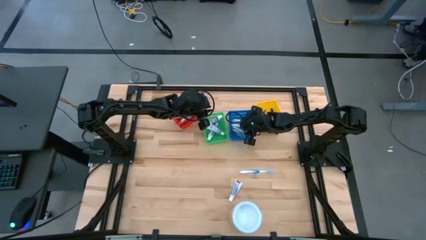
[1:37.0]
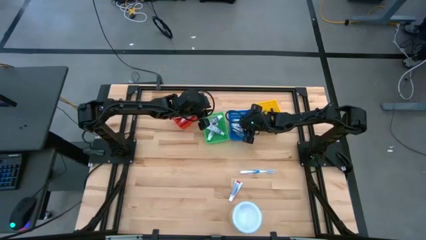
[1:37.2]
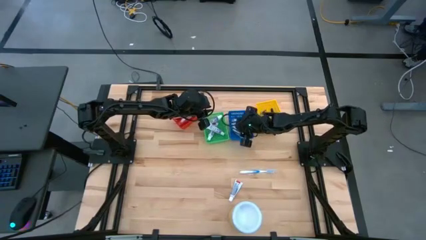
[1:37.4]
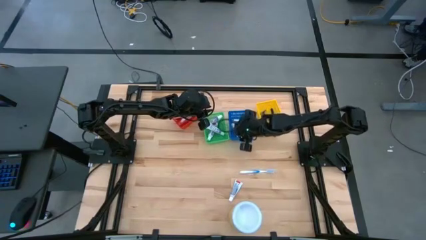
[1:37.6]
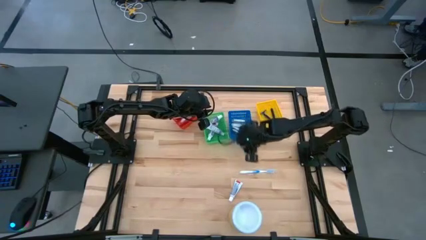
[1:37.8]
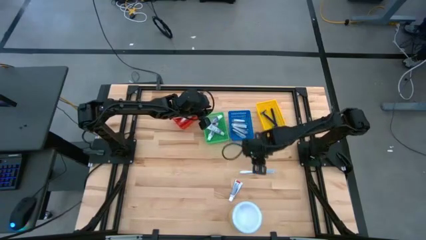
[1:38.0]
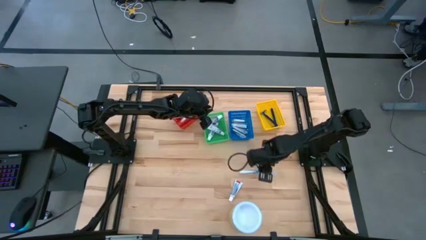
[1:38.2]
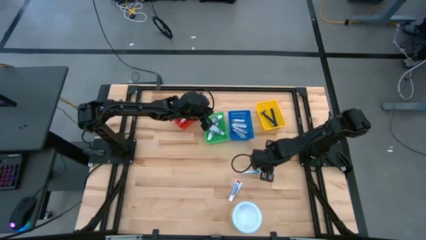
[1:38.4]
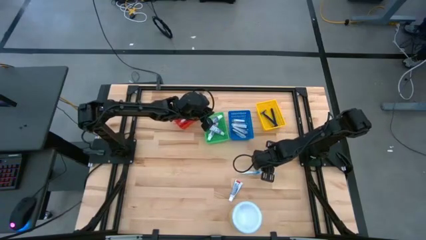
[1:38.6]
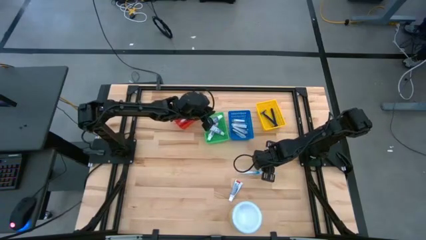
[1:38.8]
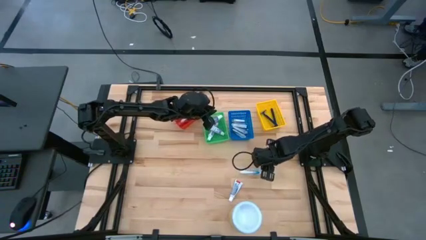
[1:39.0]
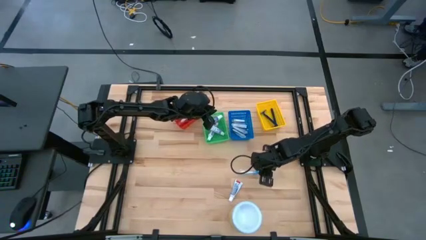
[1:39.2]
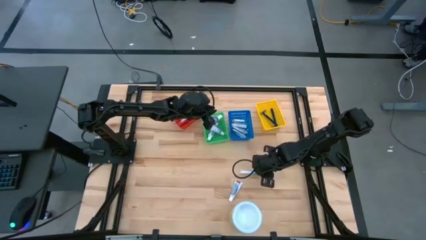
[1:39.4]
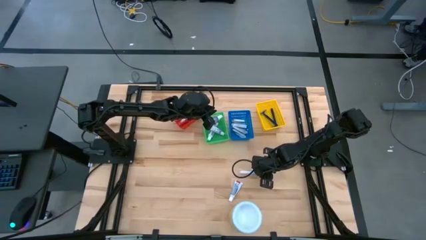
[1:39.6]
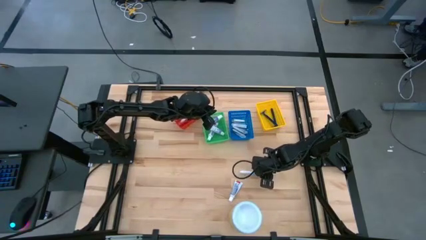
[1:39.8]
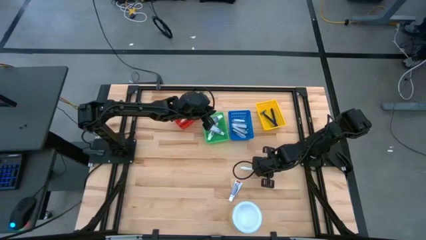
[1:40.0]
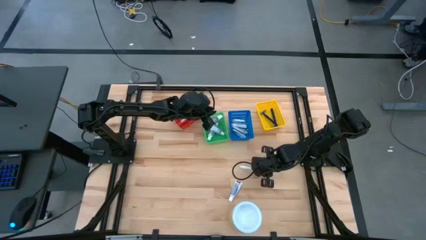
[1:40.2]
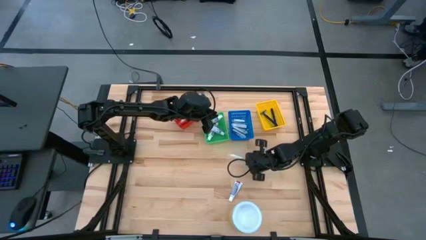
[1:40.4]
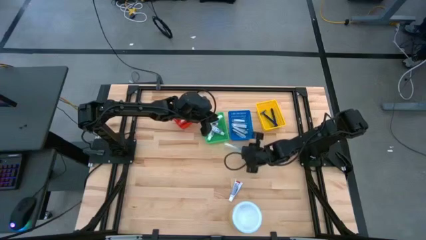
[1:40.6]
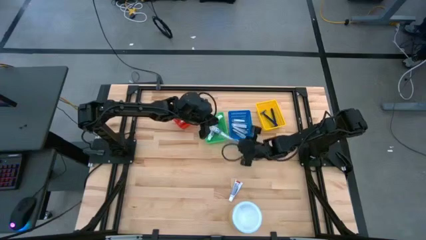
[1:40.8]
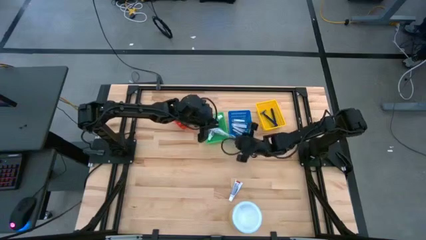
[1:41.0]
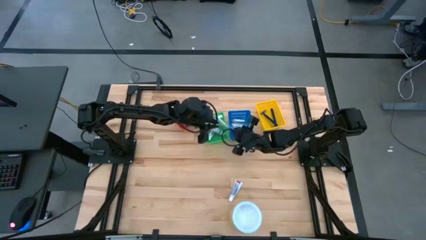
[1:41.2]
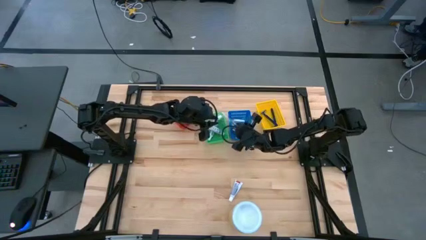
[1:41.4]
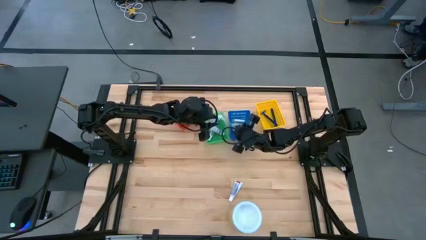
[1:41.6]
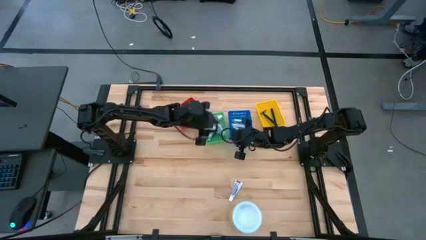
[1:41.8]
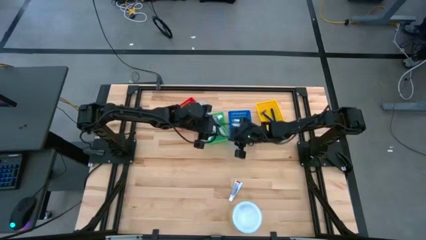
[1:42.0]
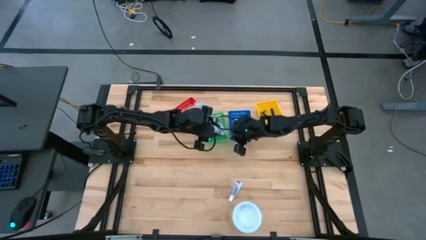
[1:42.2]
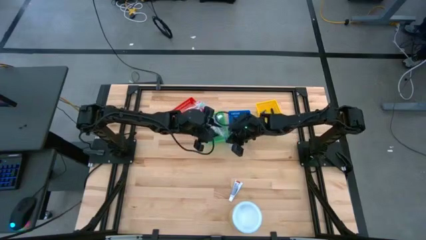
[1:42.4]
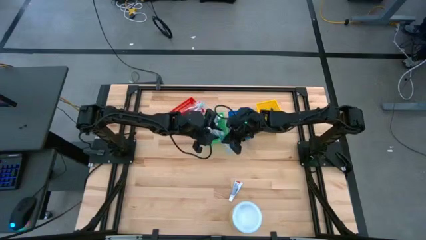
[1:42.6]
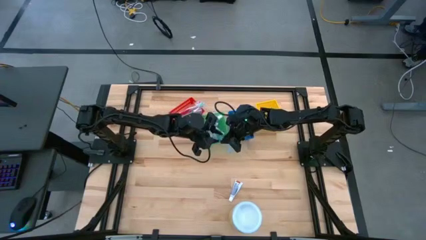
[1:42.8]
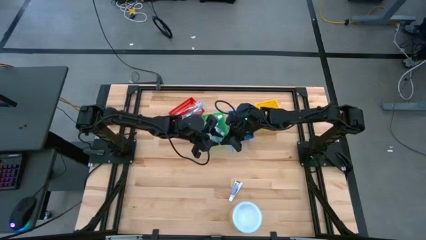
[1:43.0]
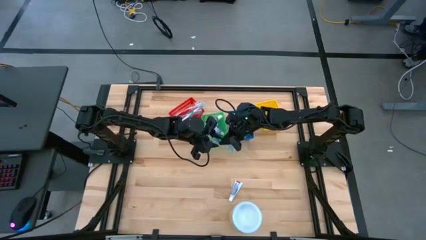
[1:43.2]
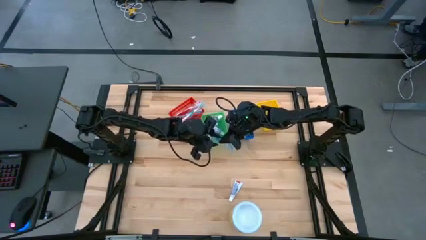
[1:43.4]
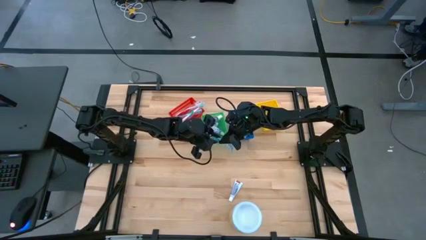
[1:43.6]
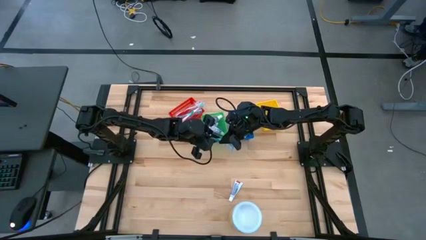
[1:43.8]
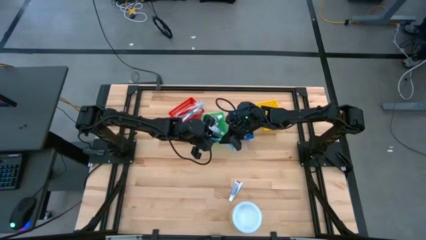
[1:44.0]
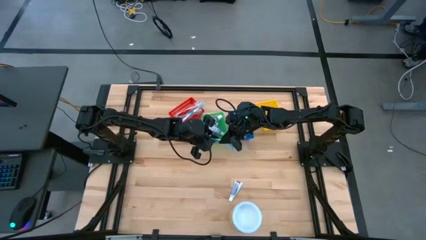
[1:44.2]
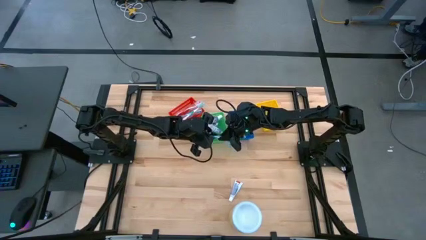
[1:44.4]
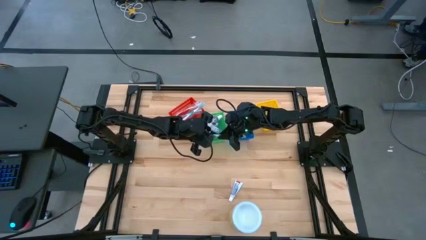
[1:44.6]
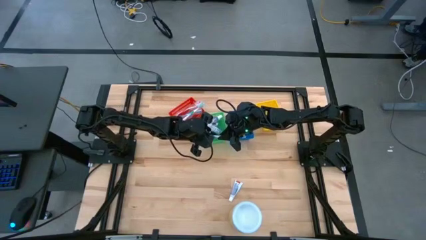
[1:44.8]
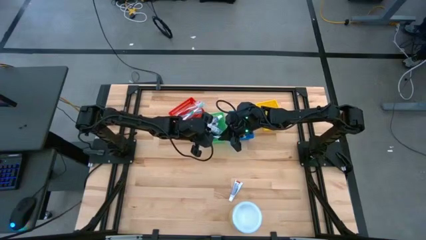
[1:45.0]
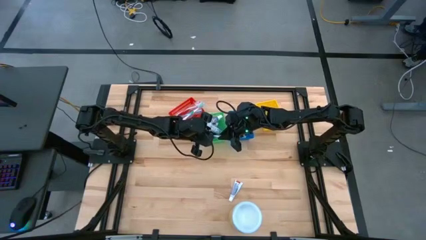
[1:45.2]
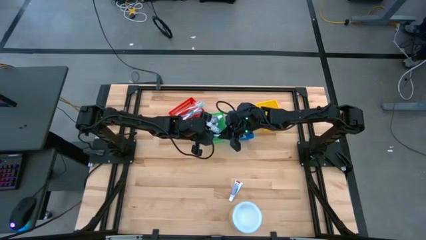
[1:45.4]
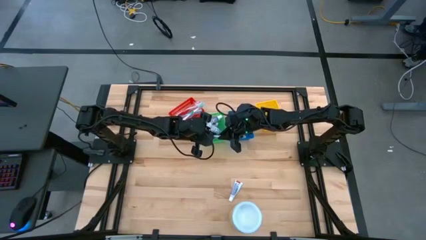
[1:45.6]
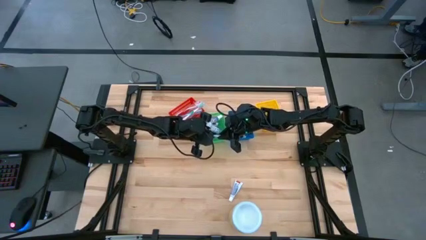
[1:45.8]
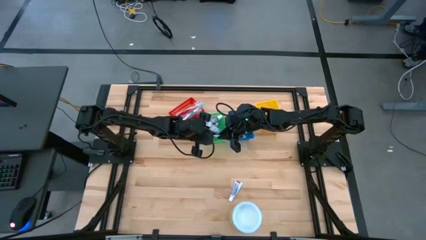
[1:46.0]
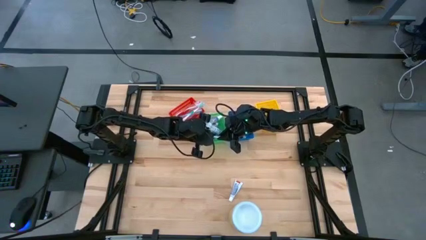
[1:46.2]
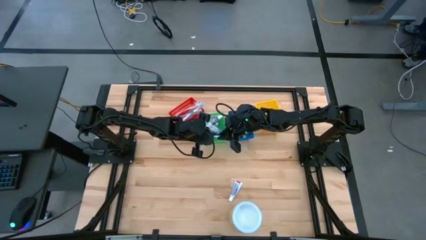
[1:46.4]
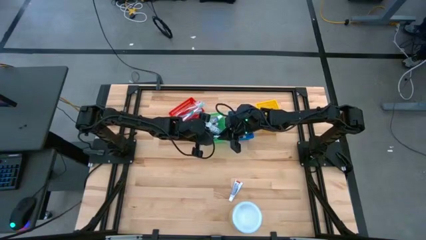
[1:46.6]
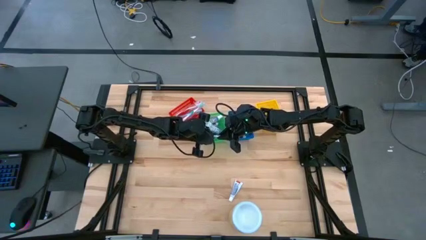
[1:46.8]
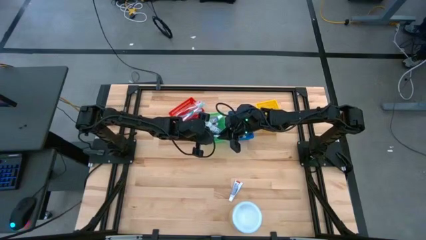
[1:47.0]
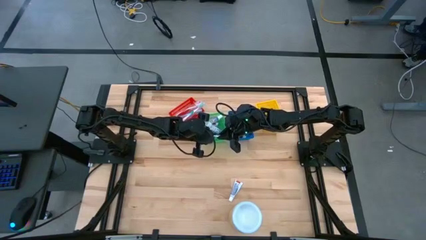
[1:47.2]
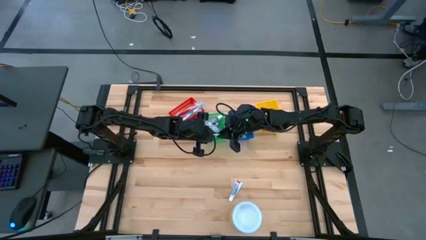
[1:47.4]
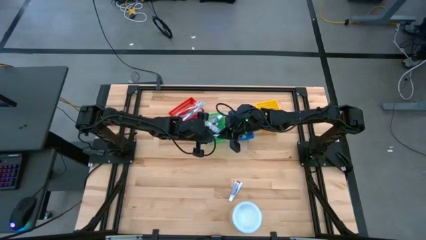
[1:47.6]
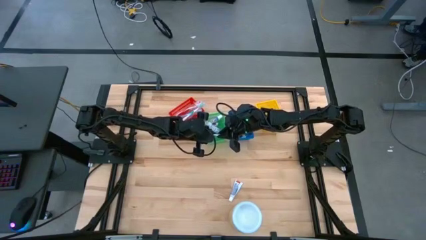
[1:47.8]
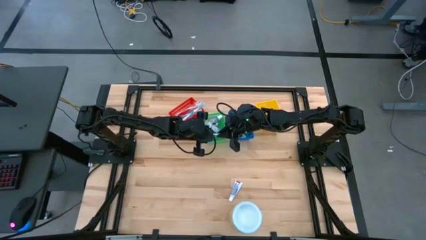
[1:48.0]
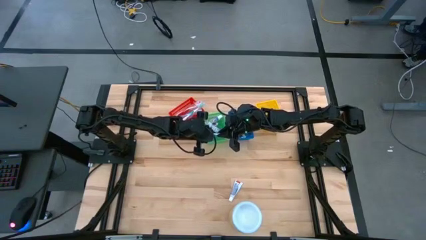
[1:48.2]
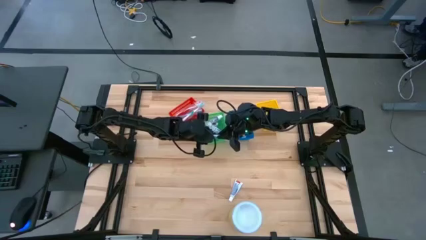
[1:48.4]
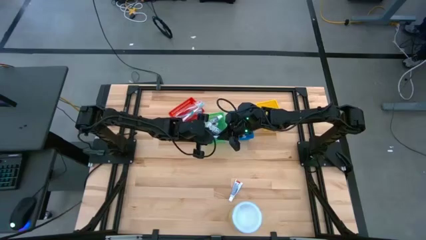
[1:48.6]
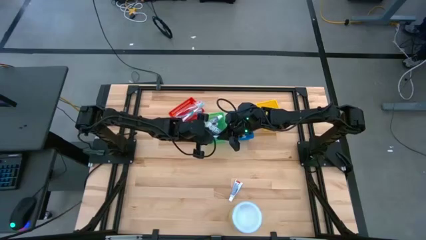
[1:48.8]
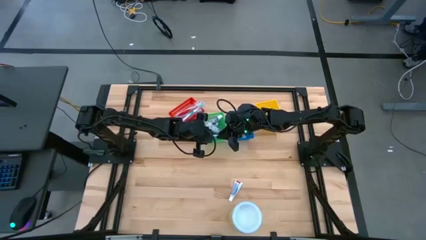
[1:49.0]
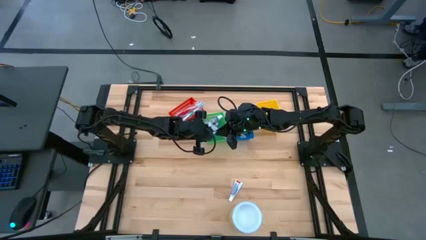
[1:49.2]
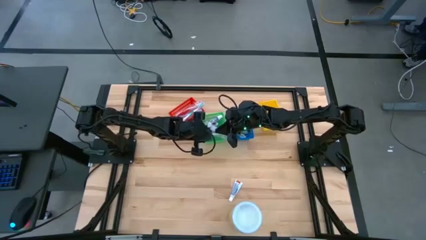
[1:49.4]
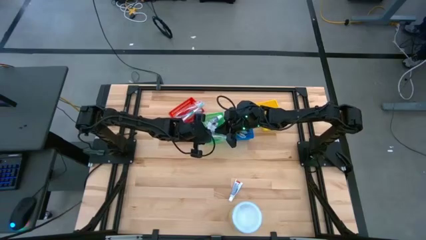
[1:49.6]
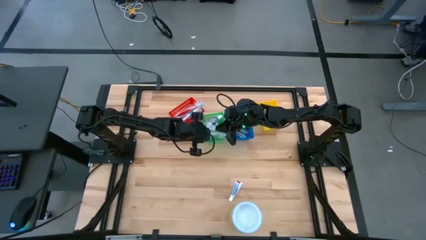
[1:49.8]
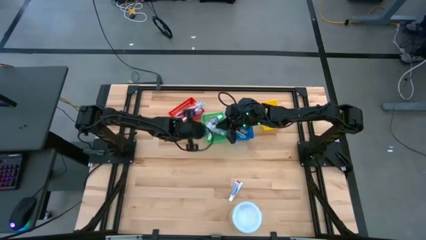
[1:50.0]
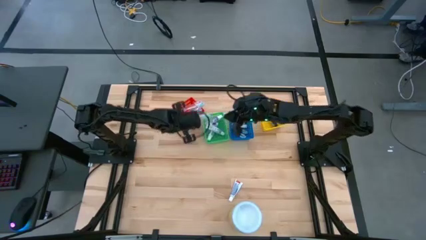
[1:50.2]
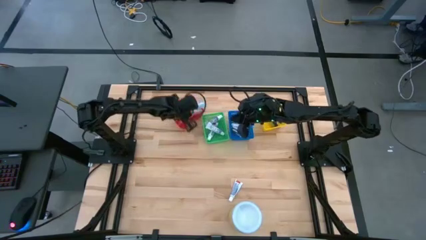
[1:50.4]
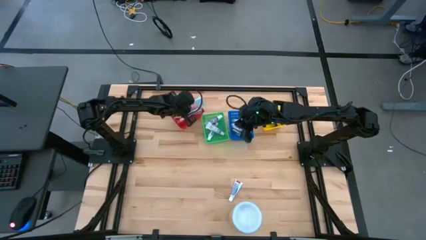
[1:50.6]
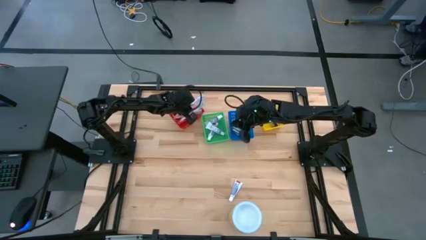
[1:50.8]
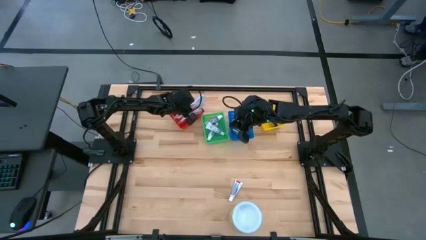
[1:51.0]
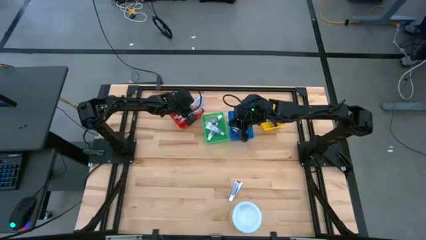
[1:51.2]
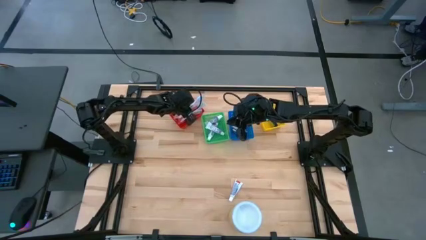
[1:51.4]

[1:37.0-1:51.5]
Task: Pick & Place Travel size toiletries
Put the blue toothbrush into the red bin

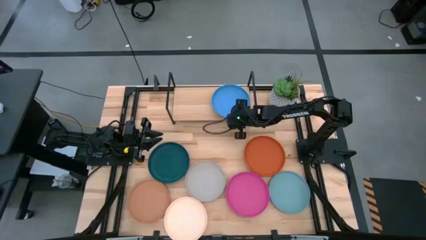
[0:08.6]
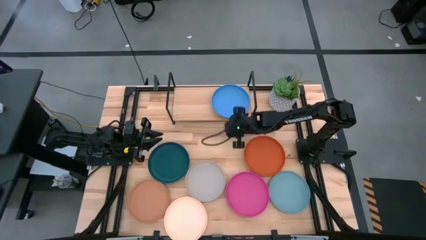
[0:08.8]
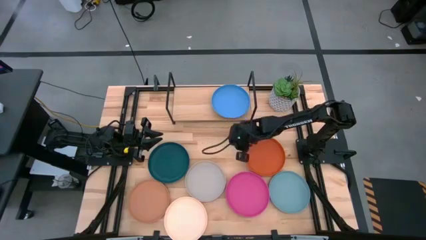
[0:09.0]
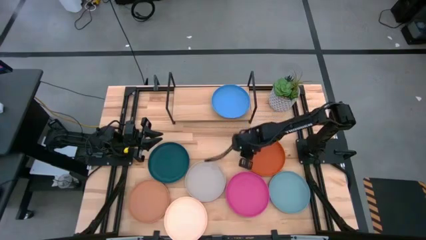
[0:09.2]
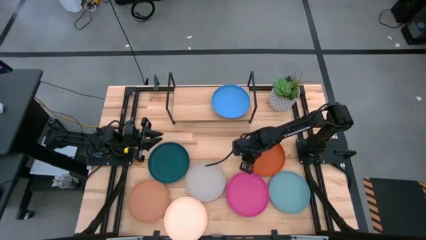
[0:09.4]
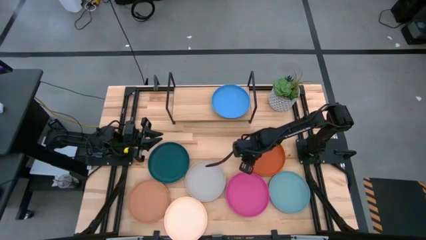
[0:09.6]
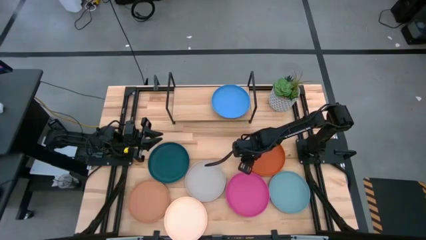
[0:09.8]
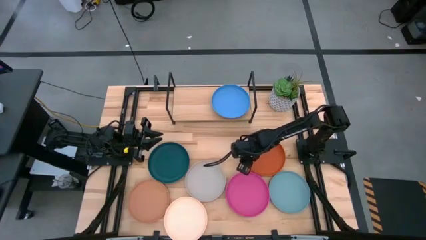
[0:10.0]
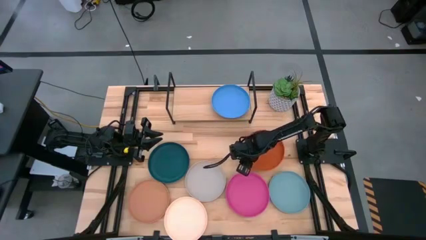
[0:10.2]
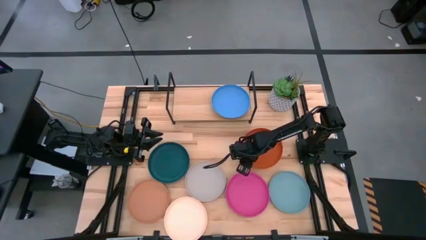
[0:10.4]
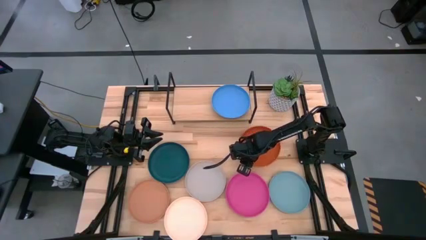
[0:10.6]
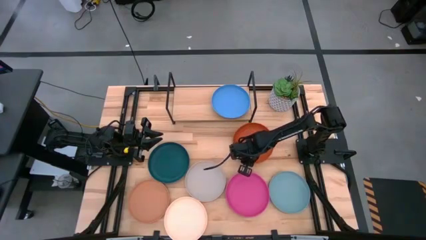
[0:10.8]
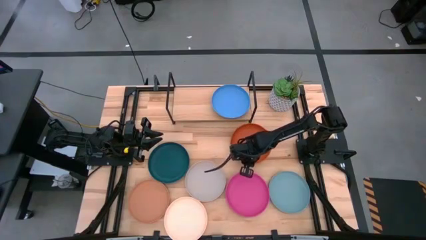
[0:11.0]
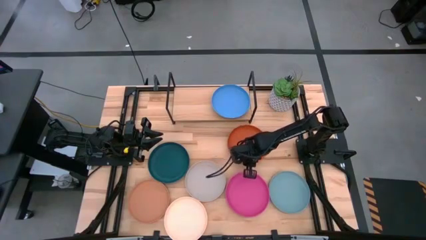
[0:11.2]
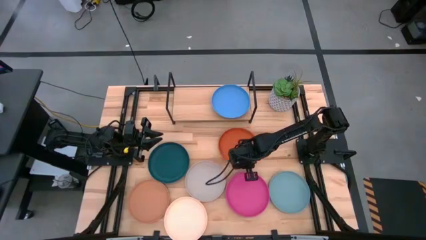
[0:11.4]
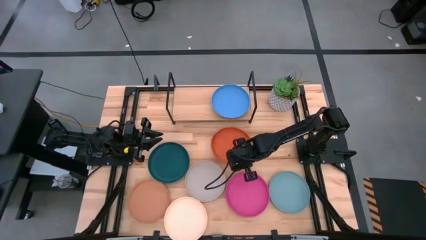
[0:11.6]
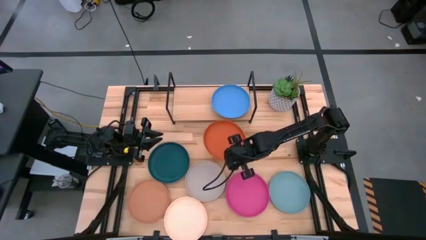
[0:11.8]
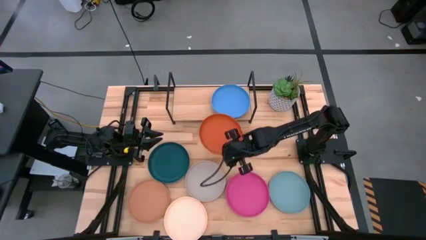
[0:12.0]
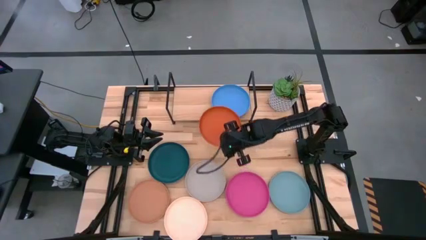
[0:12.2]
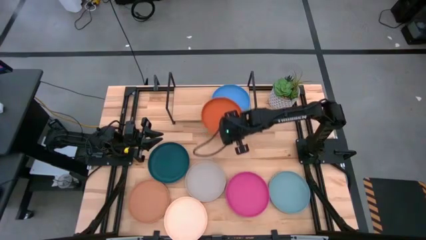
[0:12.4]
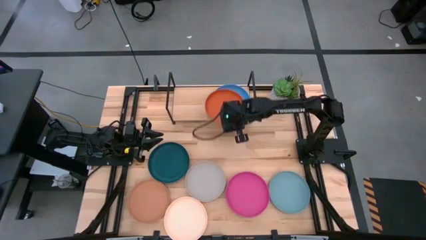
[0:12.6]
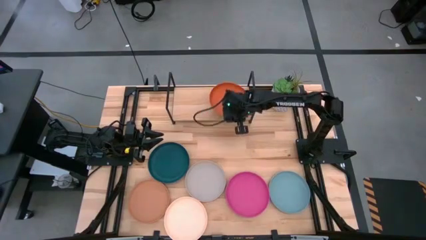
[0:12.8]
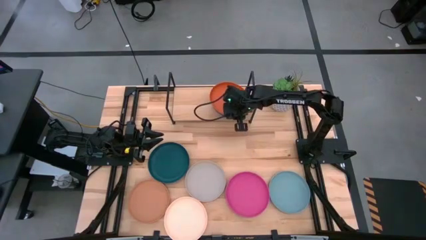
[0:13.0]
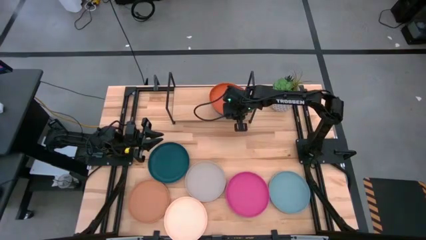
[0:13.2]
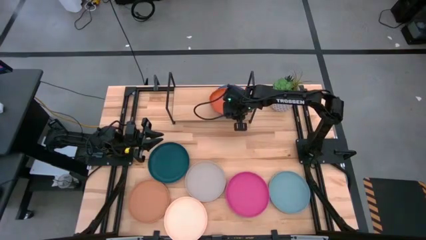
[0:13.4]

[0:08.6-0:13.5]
Task: Place and stack plates onto a shelf
Stack the orange plate on top of the blue plate on shelf
